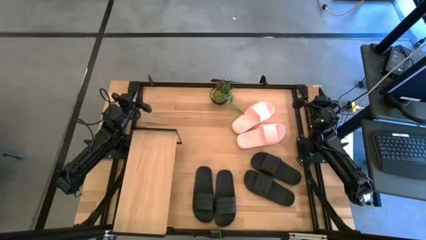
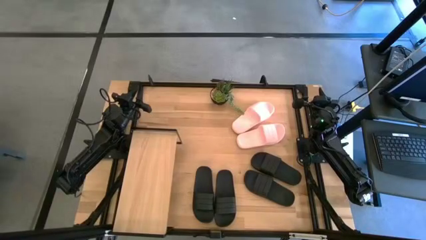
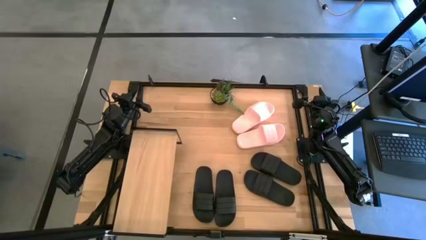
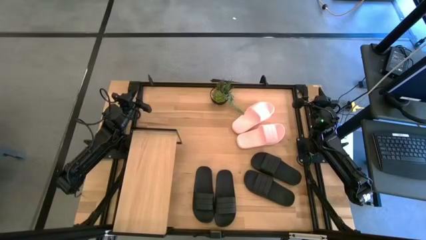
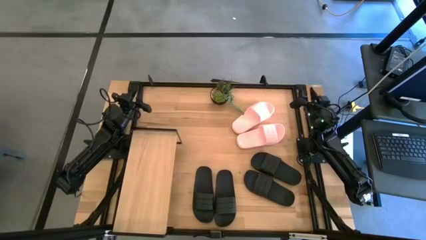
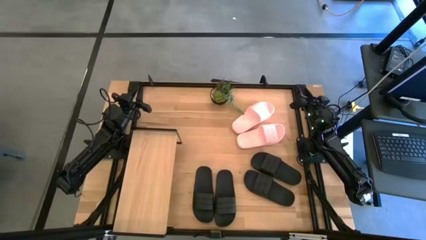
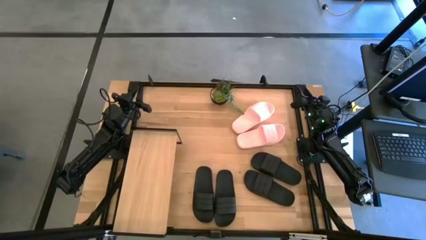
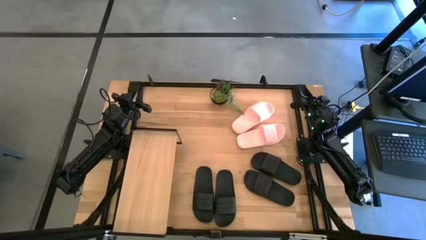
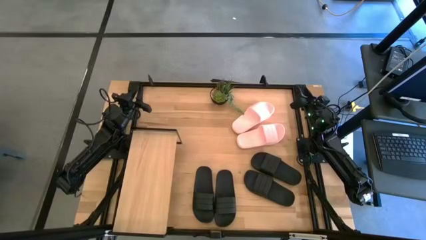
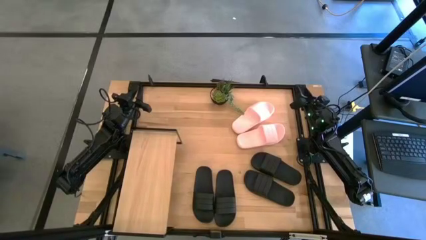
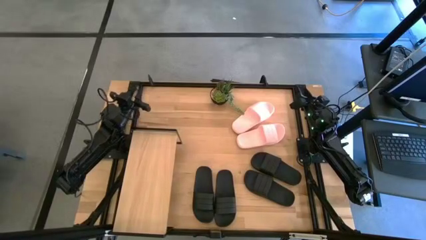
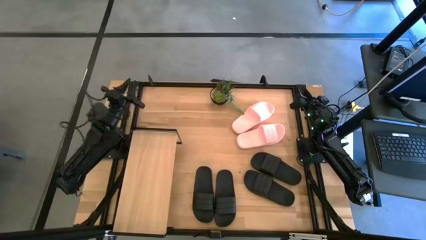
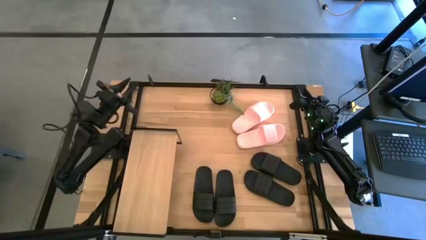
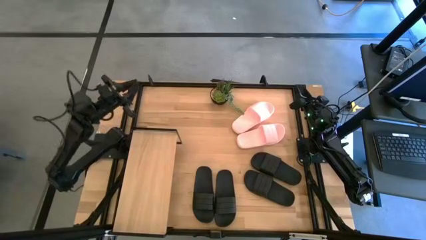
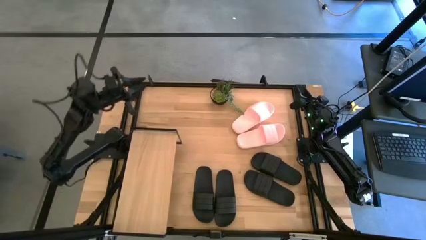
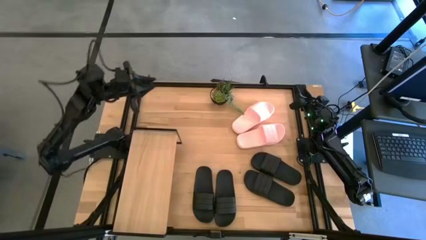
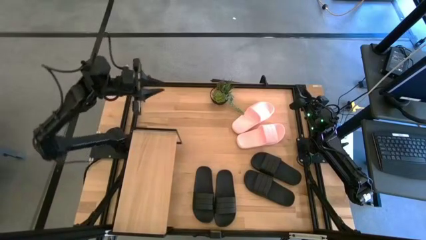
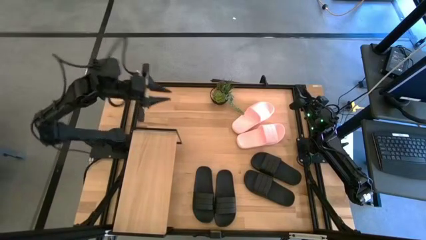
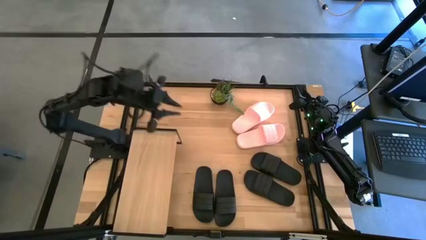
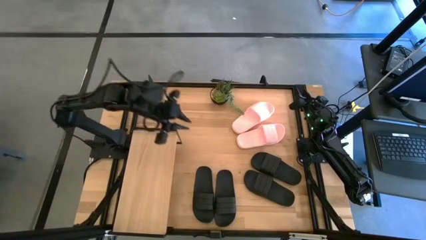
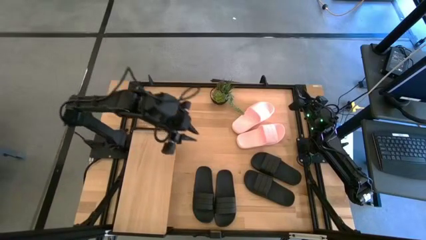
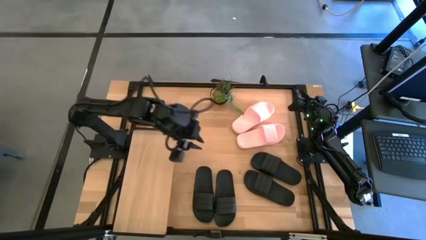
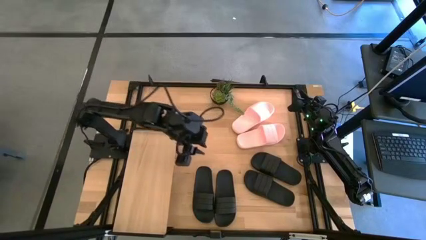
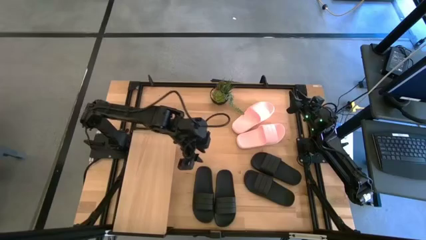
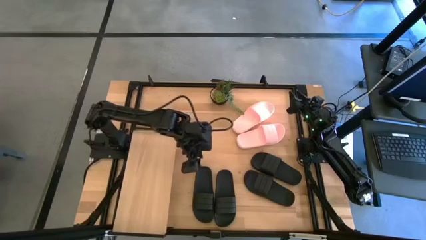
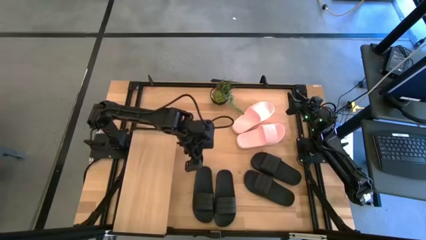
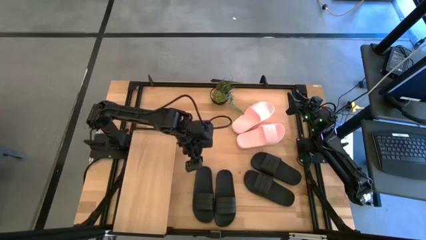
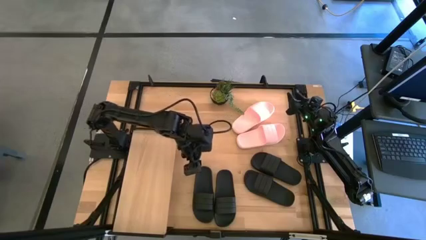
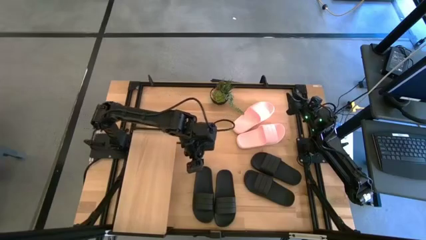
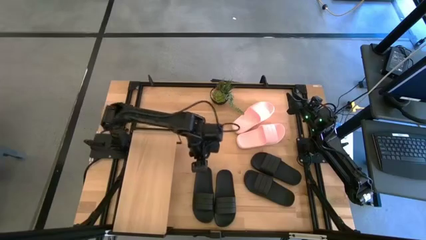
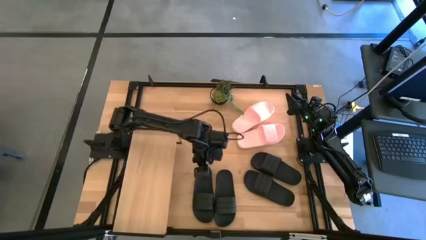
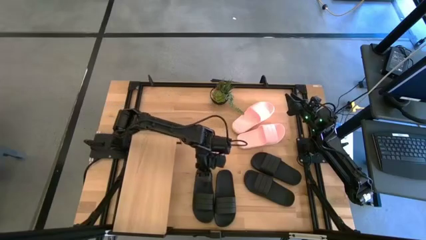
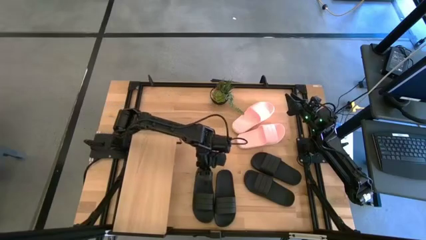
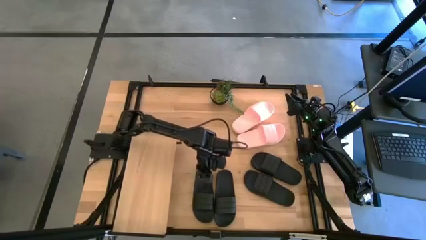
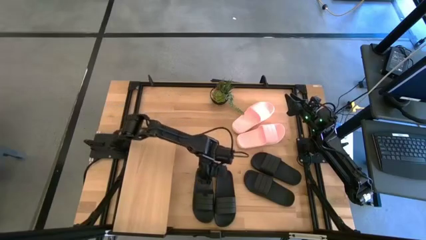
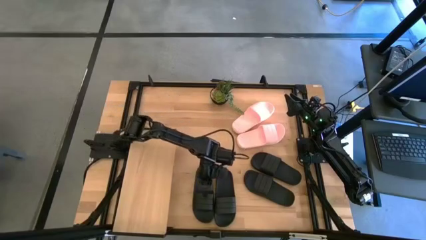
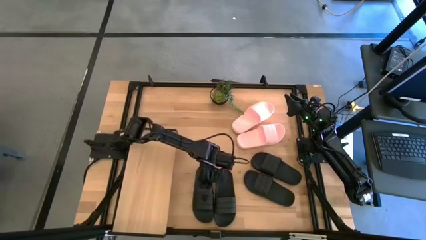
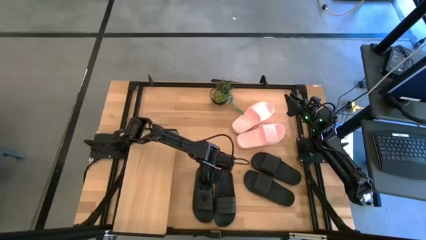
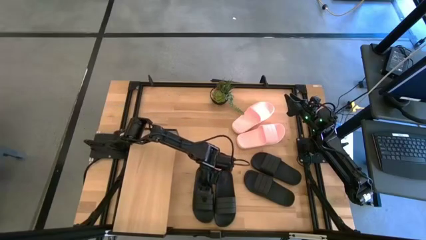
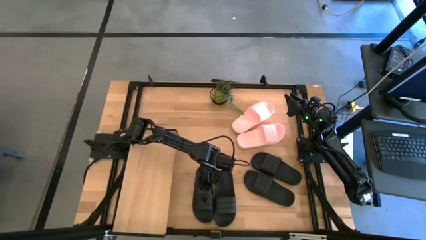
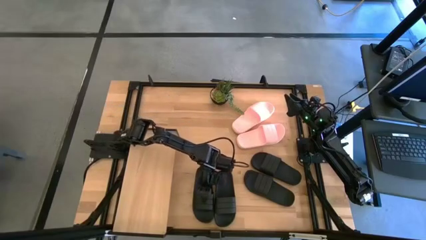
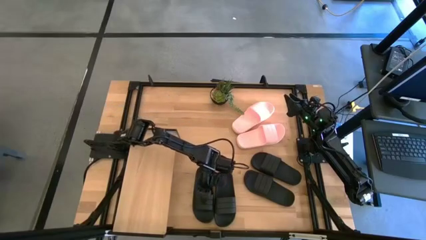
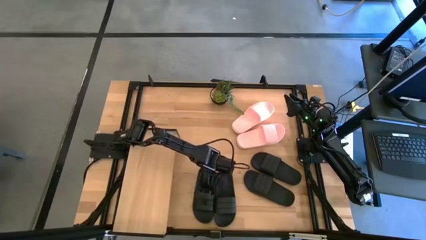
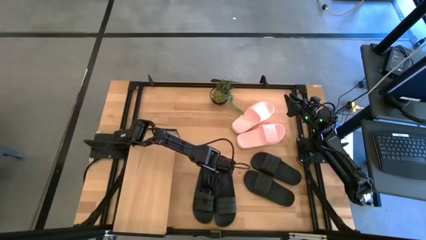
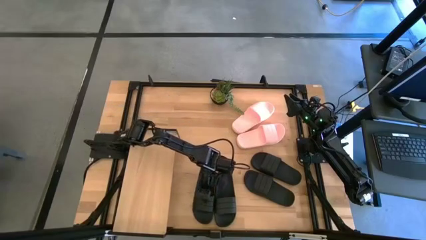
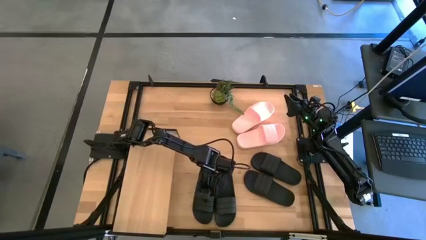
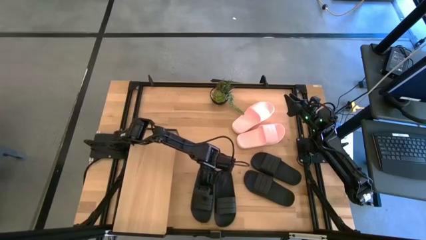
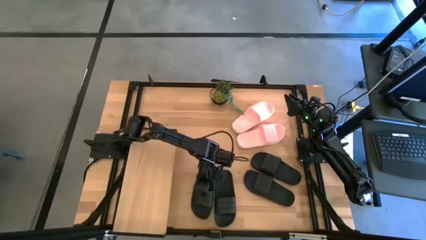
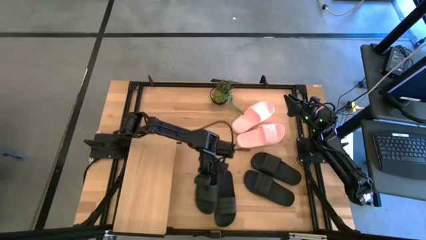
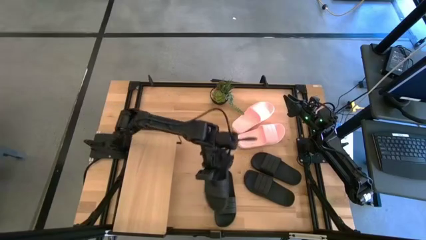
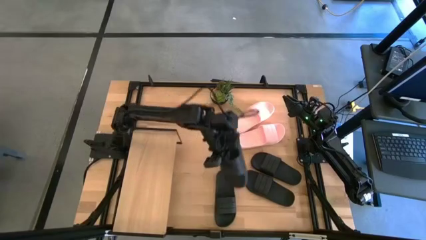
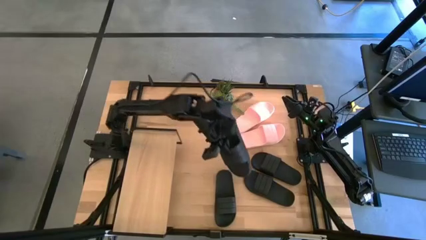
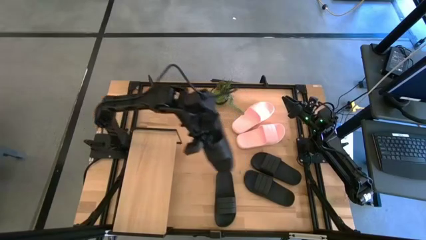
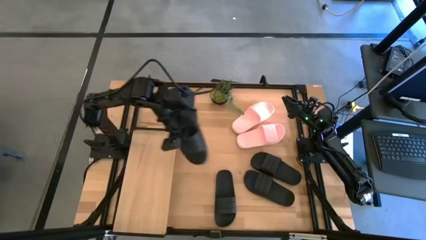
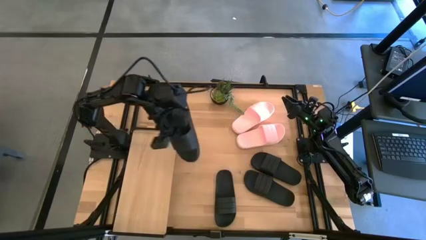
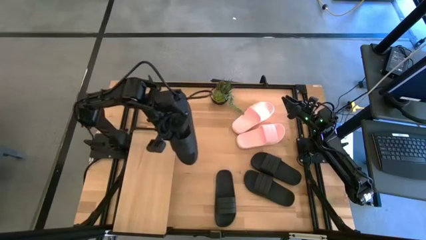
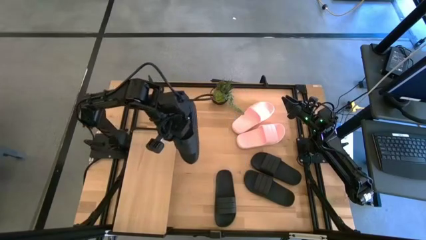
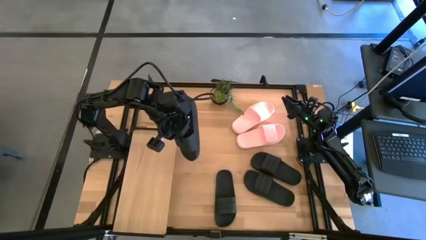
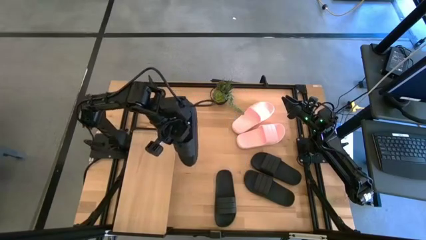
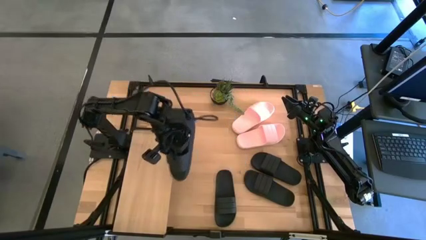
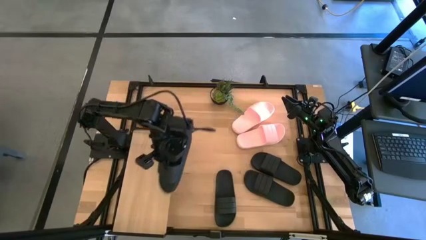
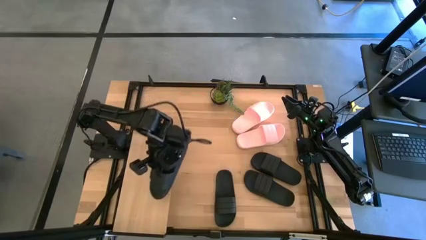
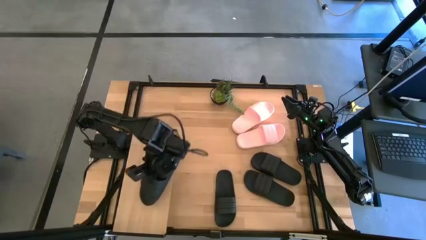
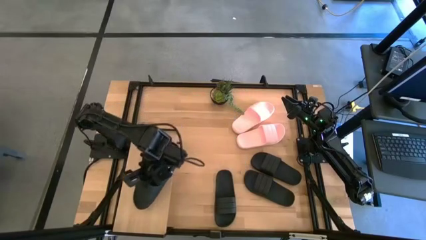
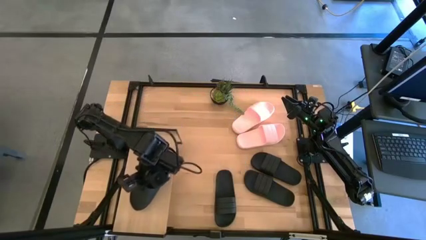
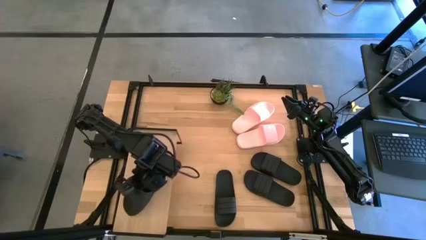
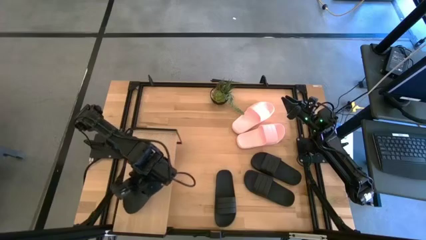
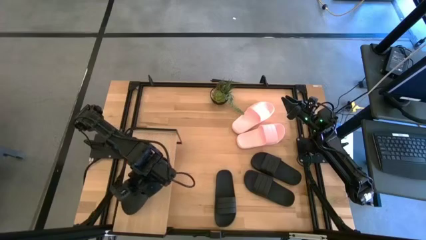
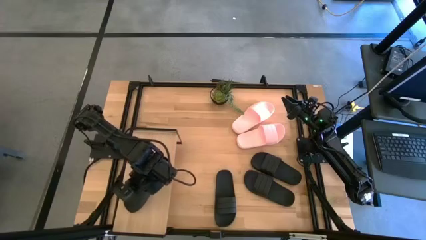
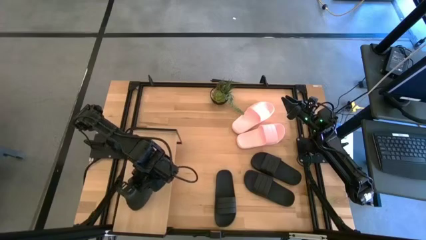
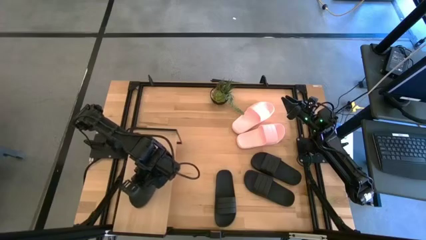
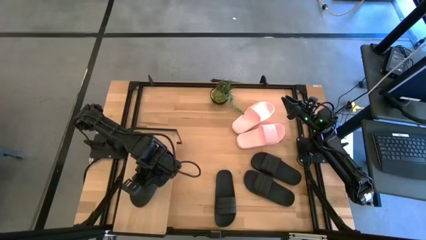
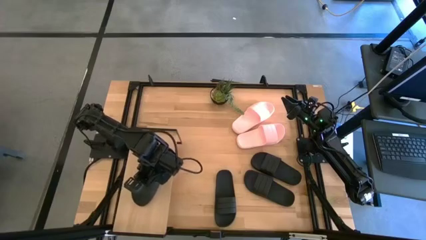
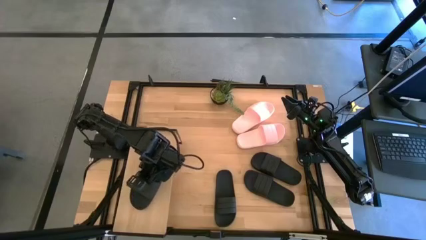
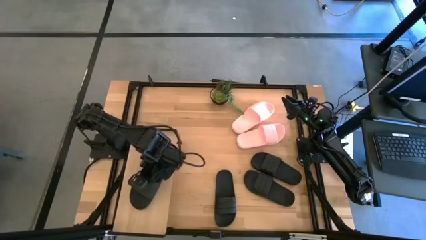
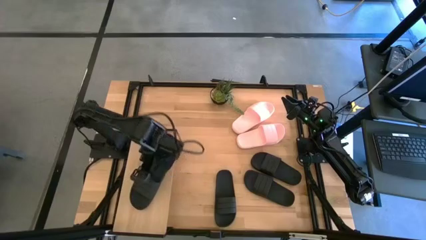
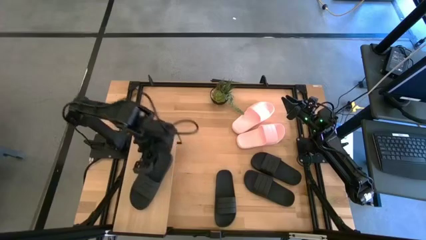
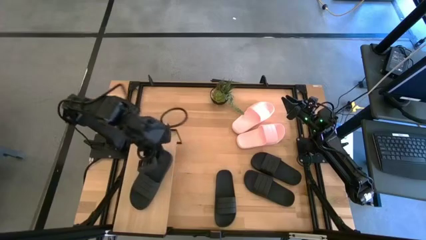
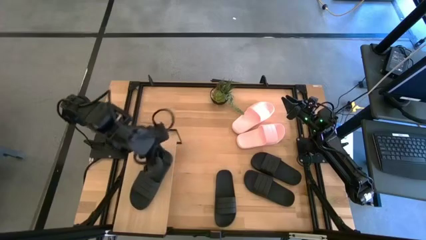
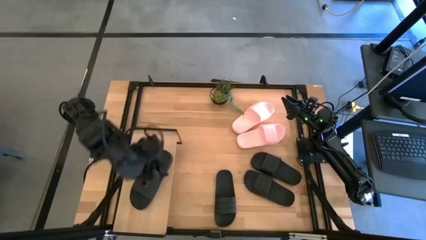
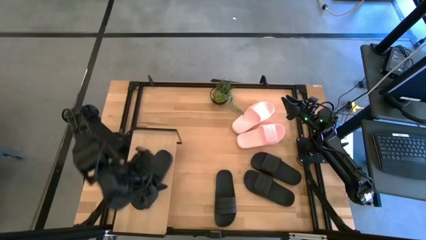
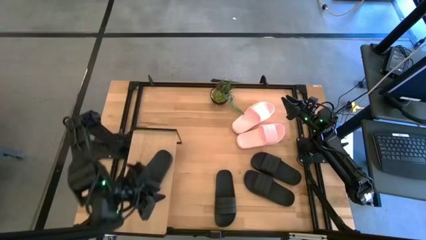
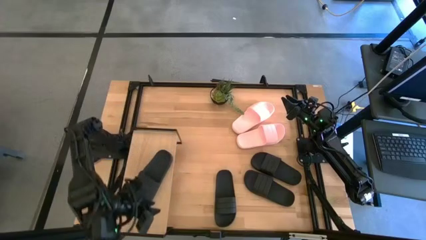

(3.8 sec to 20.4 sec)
Task: Pick and place slides into the shelf
Put the black slipper on the shelf
